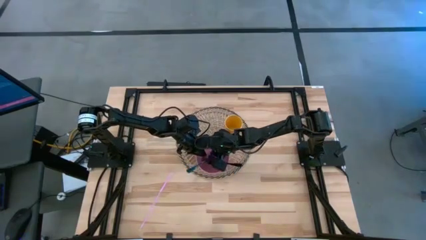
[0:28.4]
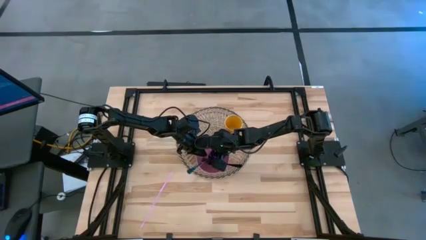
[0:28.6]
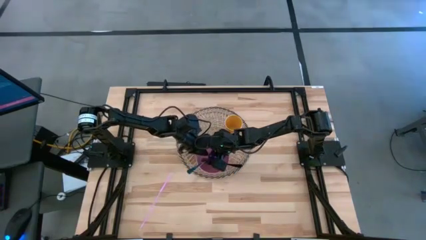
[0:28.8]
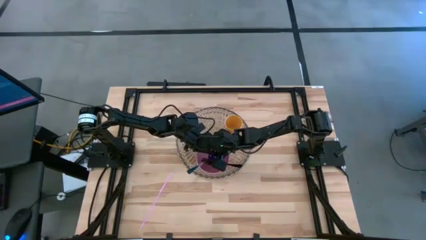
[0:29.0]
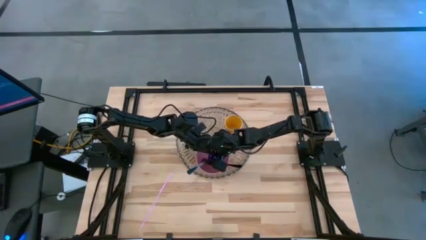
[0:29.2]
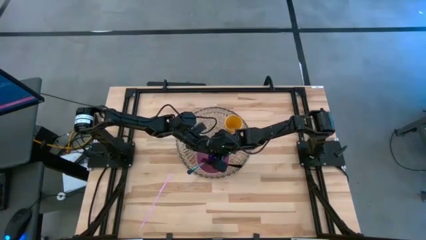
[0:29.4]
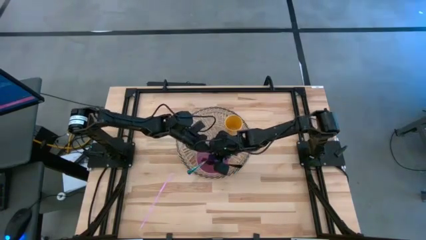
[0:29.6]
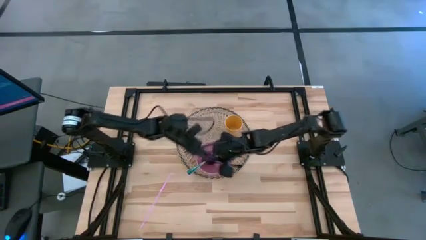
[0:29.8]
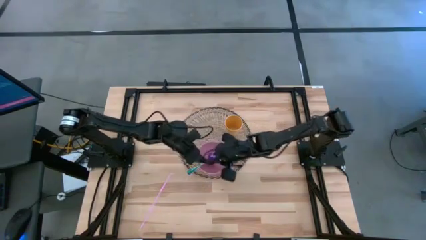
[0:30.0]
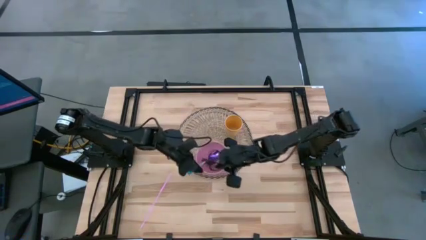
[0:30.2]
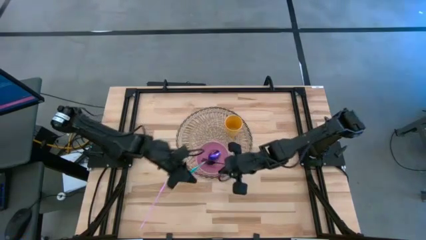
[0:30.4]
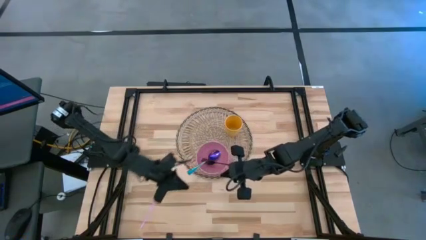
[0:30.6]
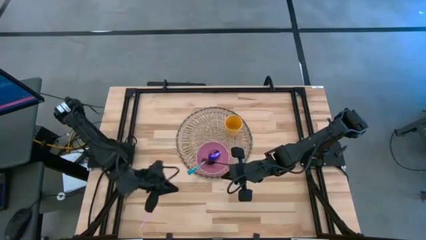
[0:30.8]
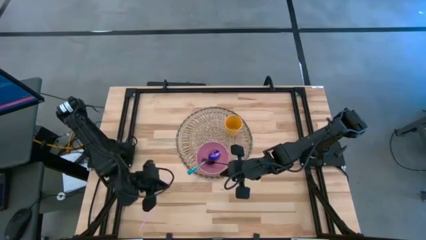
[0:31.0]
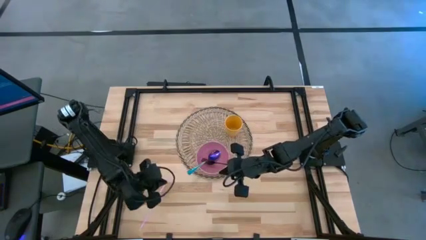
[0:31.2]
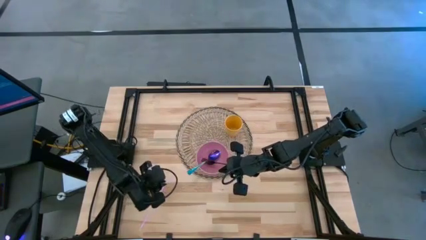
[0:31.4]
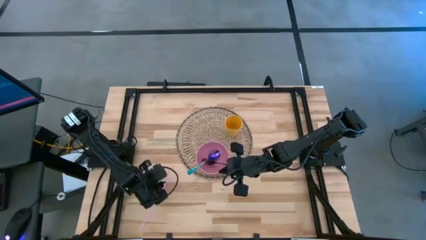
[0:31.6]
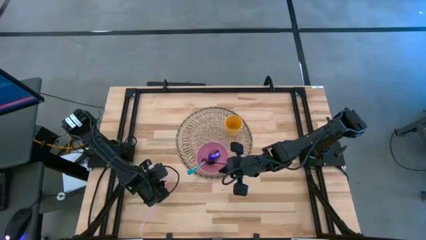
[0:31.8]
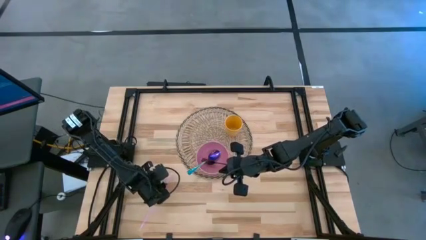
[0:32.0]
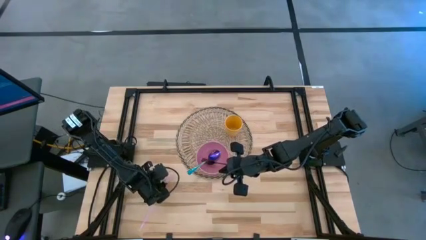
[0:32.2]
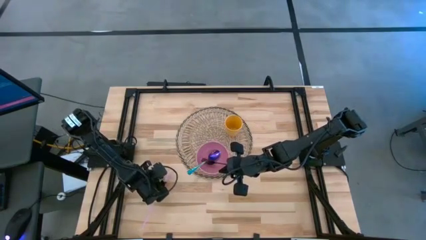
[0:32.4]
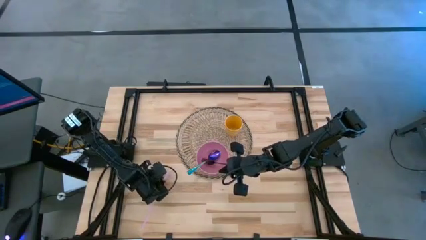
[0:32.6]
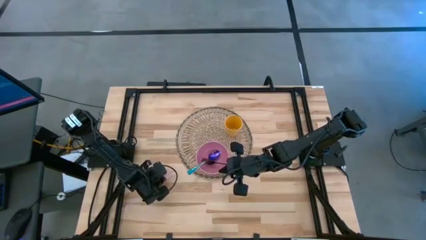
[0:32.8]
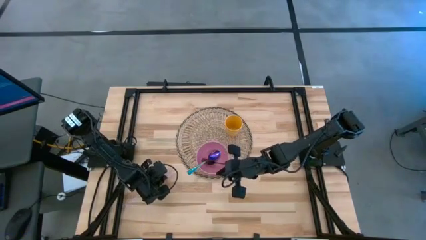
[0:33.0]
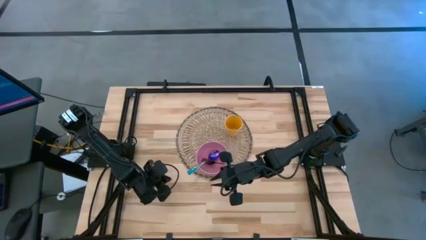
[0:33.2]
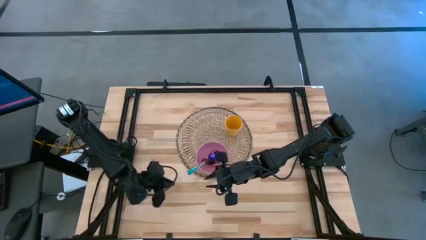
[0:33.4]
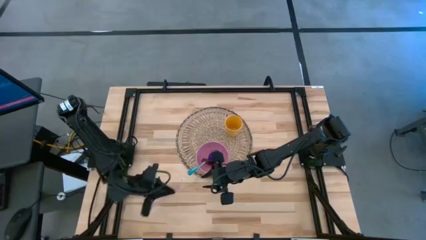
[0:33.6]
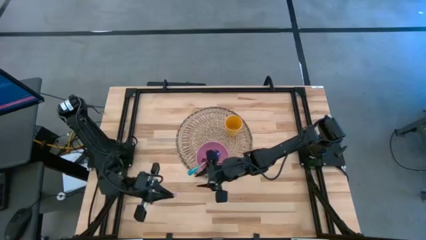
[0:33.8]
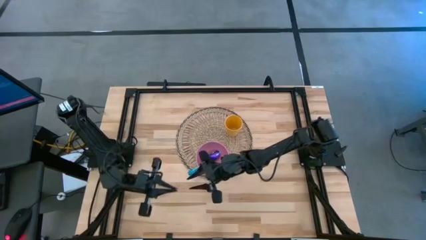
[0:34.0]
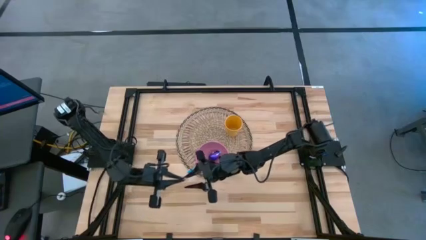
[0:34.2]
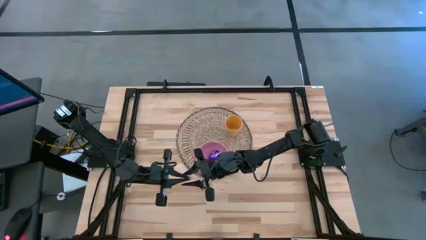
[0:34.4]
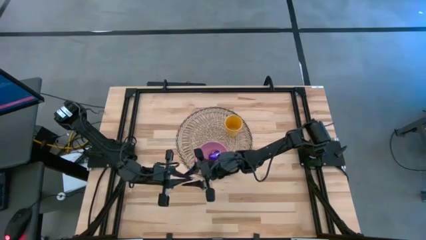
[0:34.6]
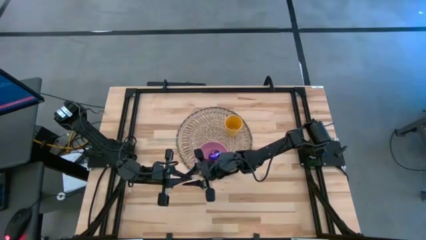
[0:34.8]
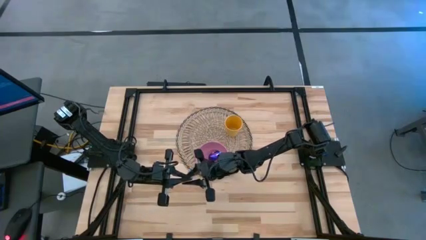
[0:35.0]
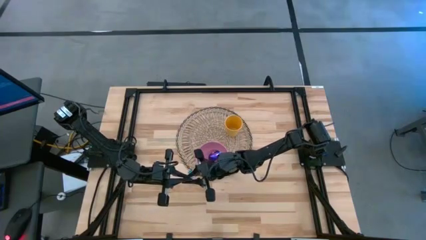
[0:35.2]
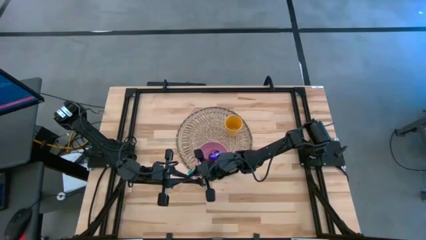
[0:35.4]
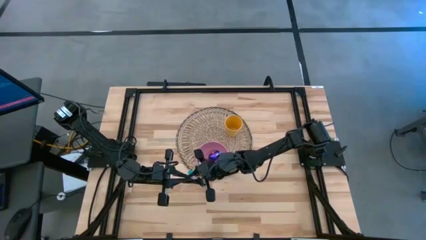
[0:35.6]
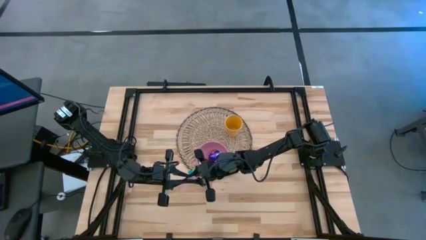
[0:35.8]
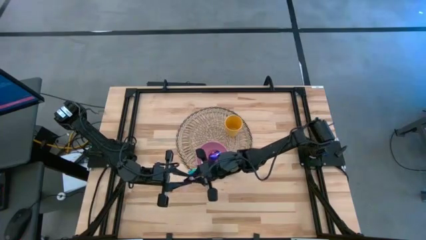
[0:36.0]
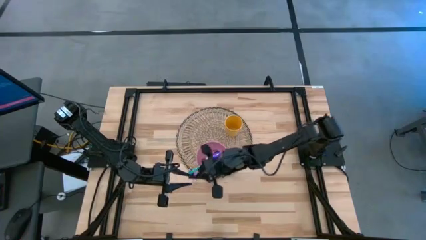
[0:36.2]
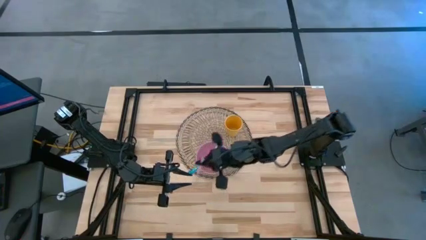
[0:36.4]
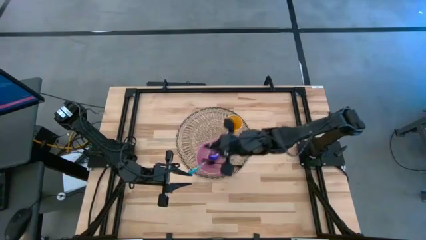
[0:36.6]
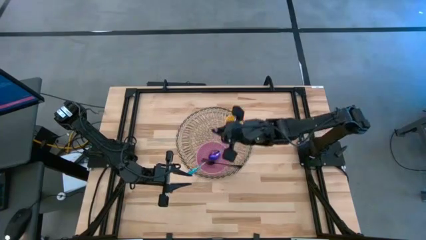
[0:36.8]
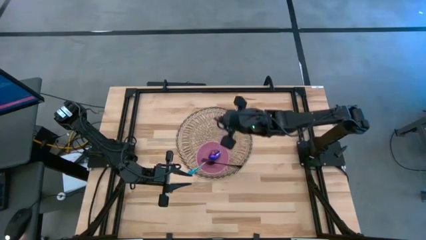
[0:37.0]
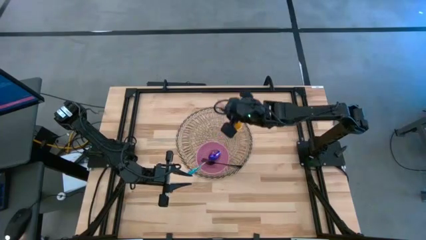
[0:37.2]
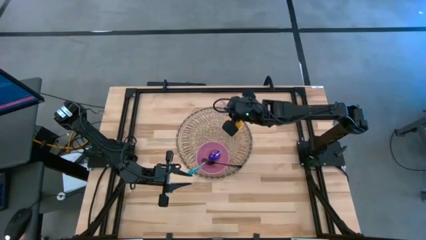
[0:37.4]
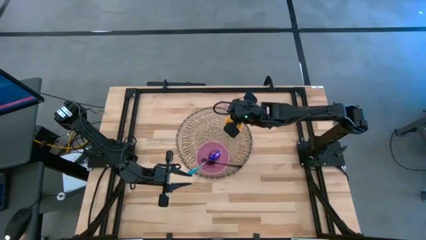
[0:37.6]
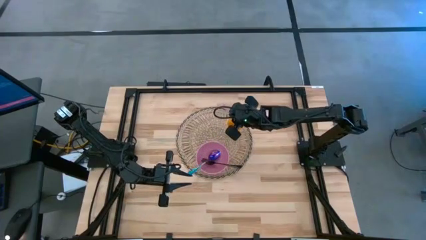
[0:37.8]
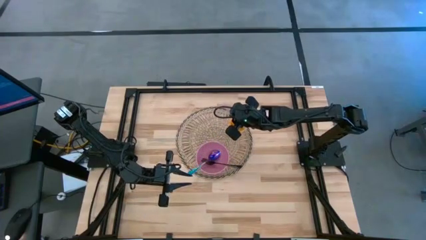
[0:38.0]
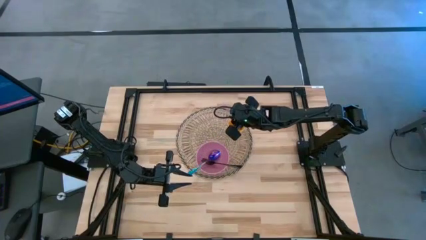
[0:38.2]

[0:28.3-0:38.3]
Task: Pick & Place Utensil
Put the pink straw in the yellow cup

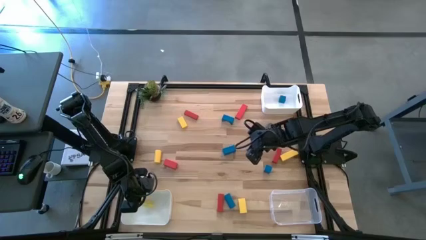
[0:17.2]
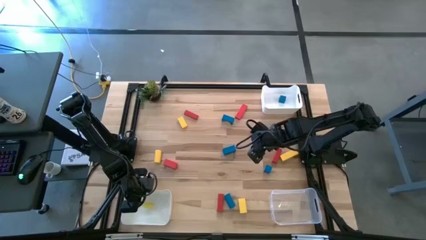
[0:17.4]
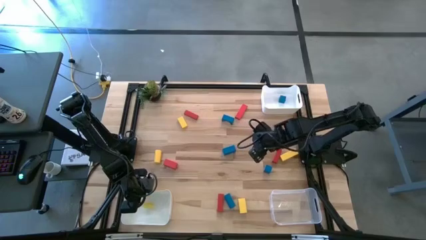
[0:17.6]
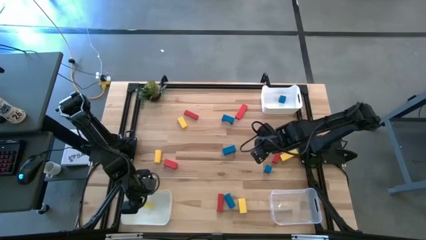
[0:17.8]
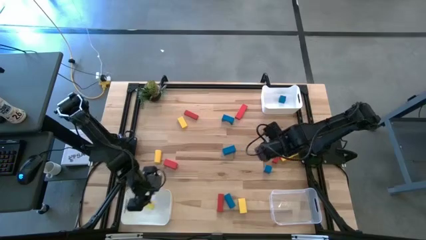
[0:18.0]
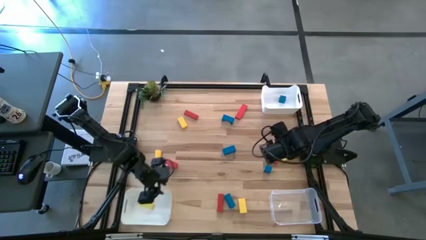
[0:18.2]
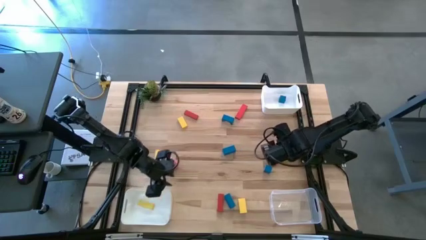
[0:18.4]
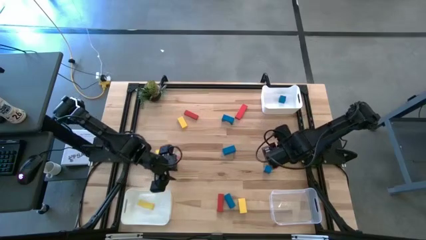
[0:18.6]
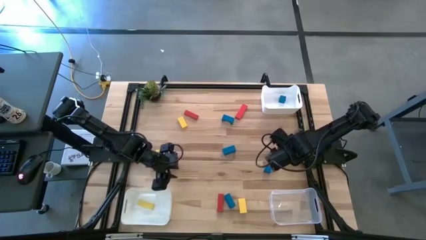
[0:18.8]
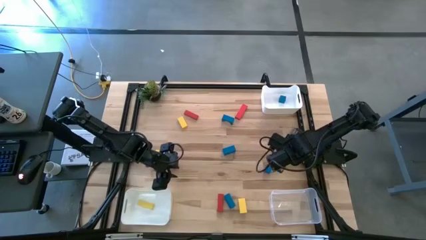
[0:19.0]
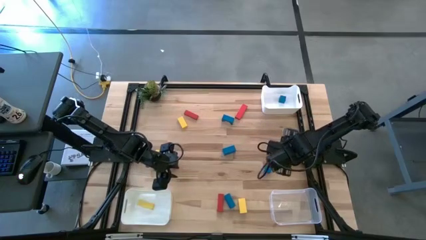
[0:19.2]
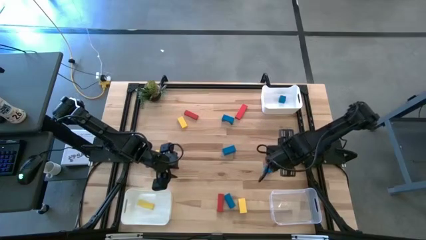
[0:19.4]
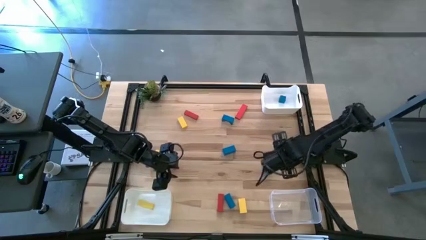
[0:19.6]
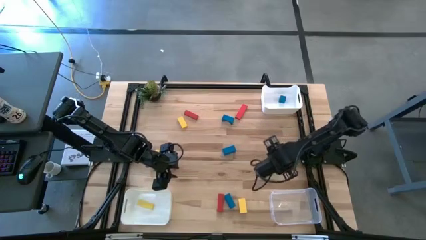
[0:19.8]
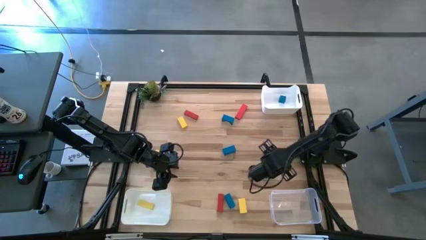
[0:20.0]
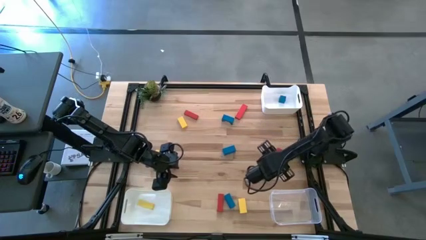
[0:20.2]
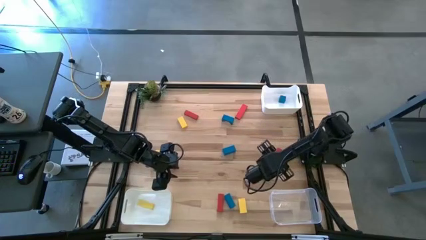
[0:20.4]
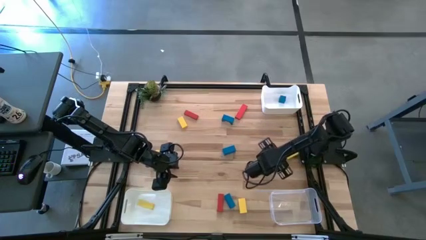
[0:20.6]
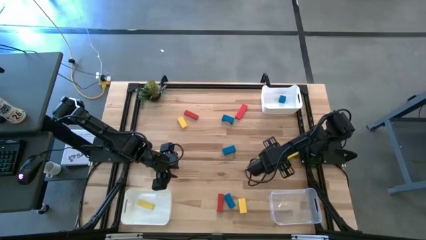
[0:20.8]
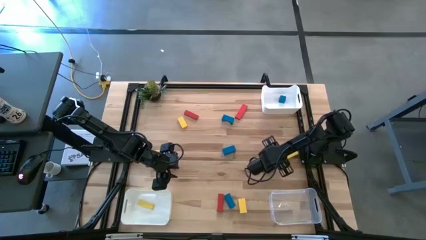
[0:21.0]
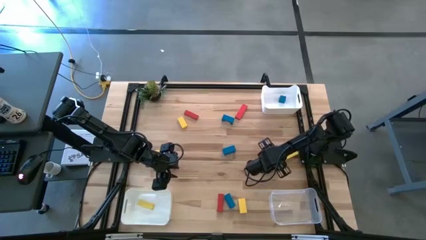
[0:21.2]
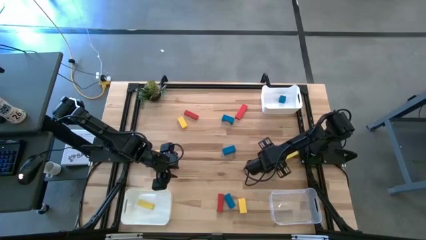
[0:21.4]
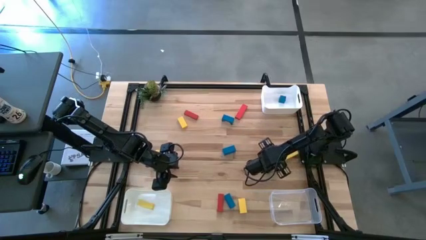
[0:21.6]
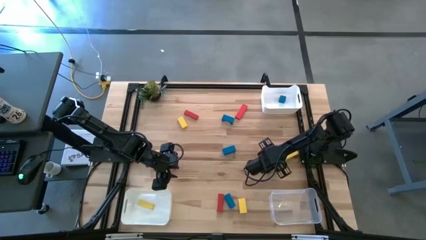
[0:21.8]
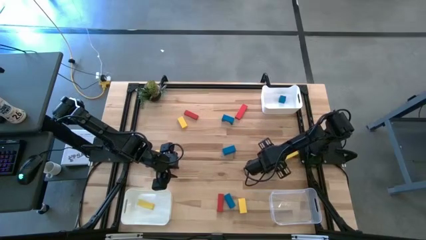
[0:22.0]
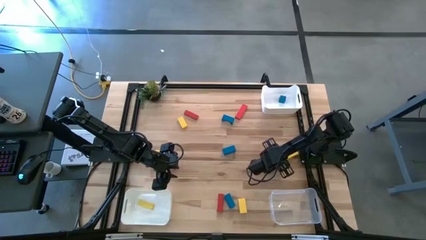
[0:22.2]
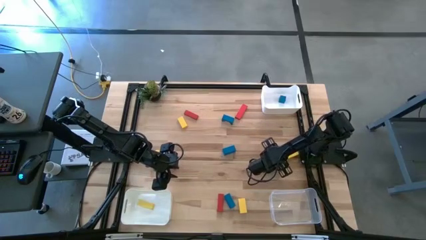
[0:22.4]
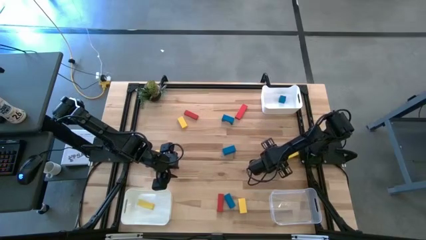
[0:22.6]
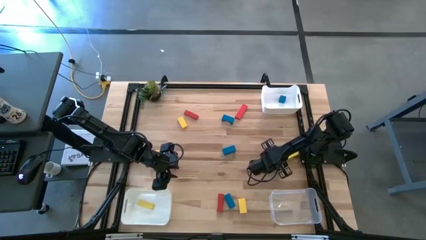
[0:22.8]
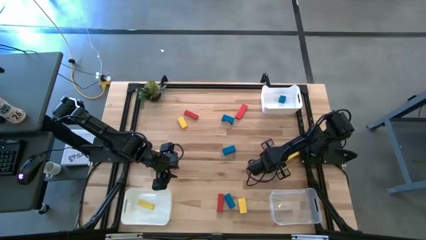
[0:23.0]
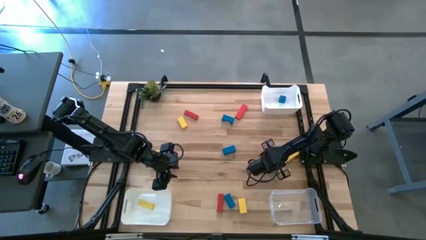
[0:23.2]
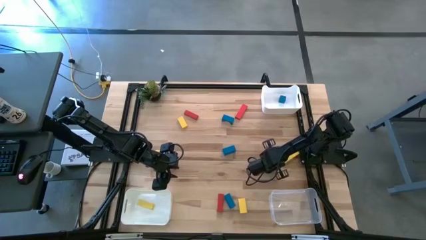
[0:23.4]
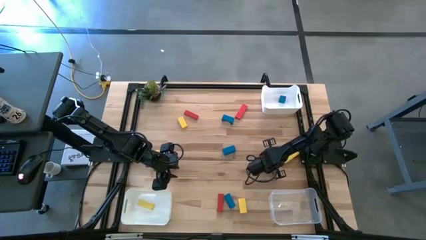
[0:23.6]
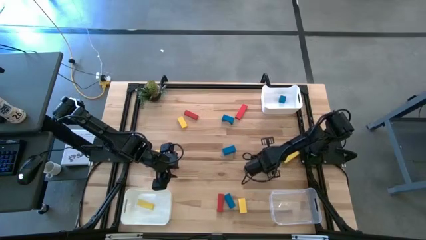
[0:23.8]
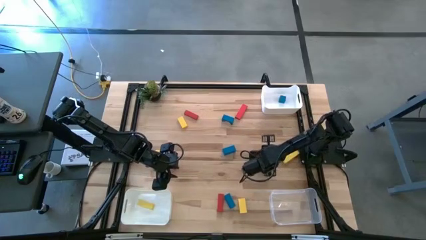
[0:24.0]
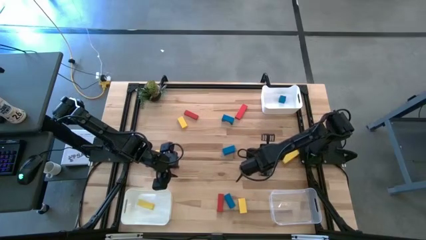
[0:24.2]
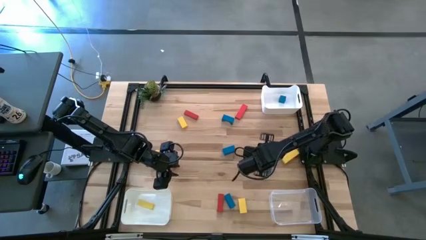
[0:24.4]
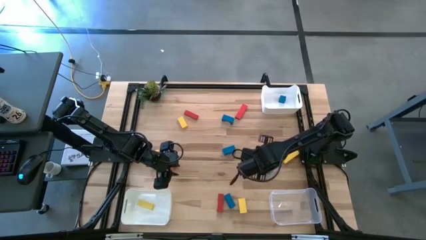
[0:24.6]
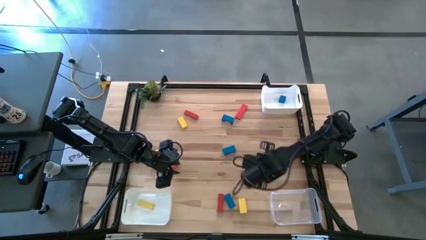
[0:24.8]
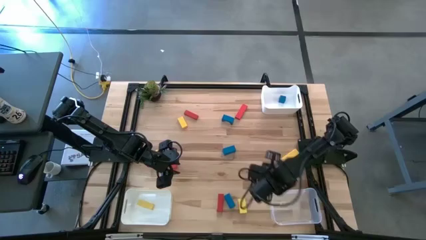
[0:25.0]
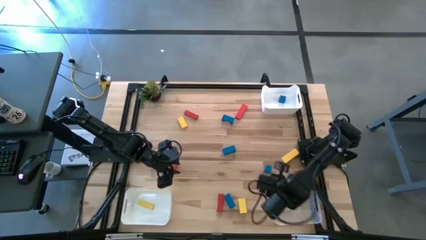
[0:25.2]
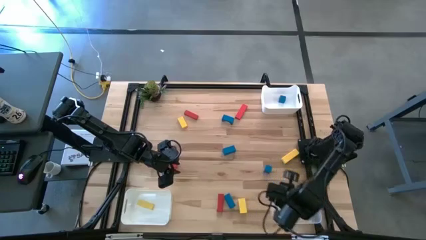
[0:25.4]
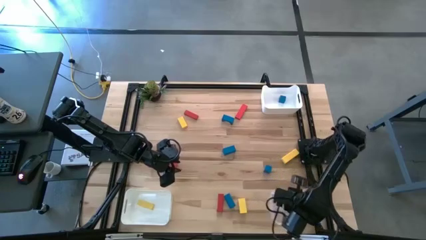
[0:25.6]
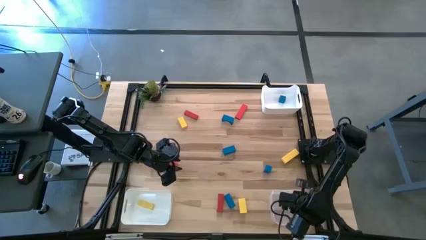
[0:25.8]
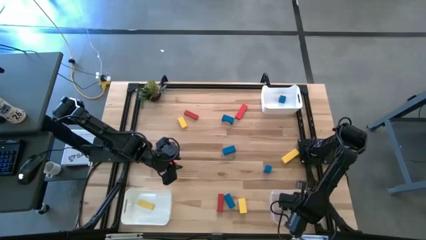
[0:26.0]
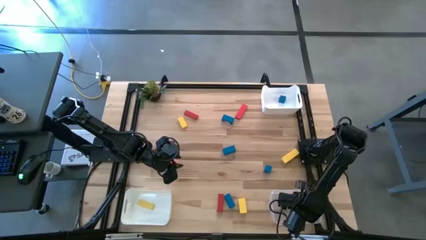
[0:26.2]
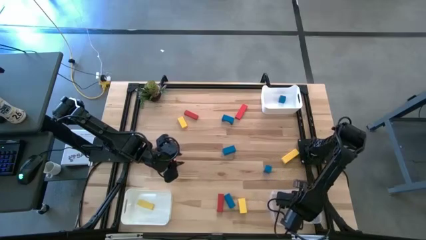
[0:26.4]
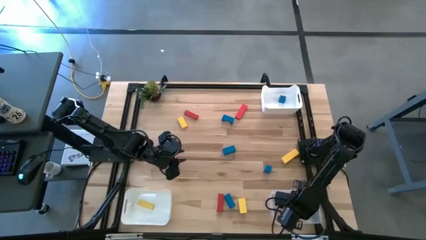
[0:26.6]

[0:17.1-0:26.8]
Task: Sort & place blocks by color
Put the red block into the transparent bin
